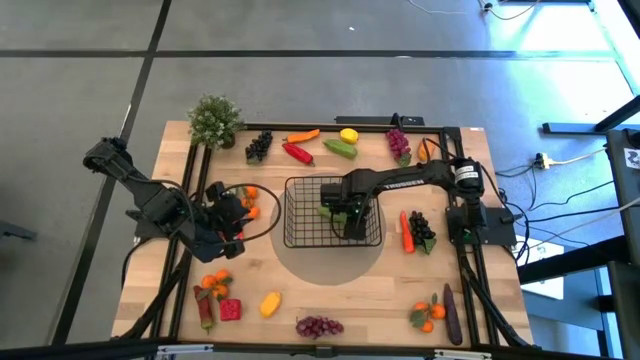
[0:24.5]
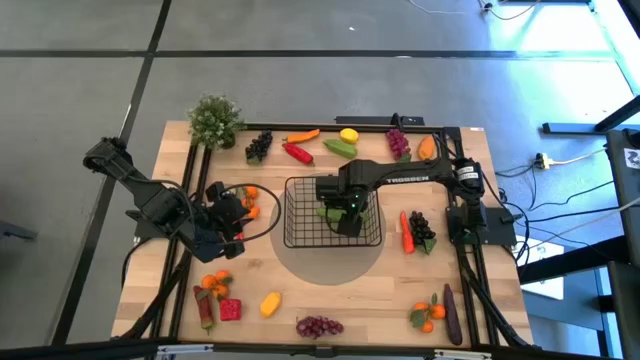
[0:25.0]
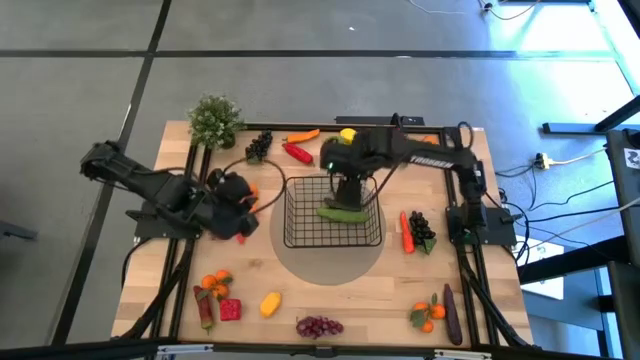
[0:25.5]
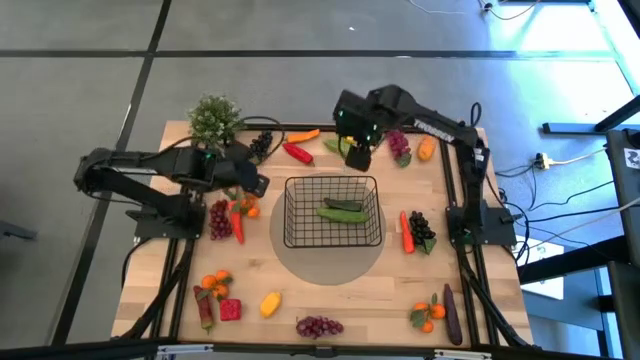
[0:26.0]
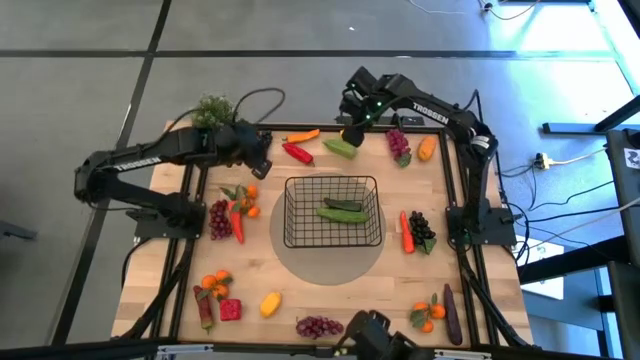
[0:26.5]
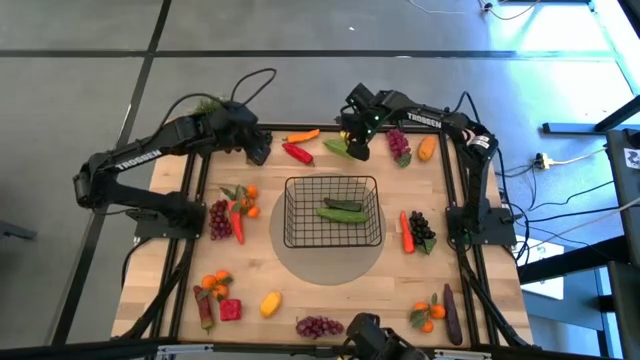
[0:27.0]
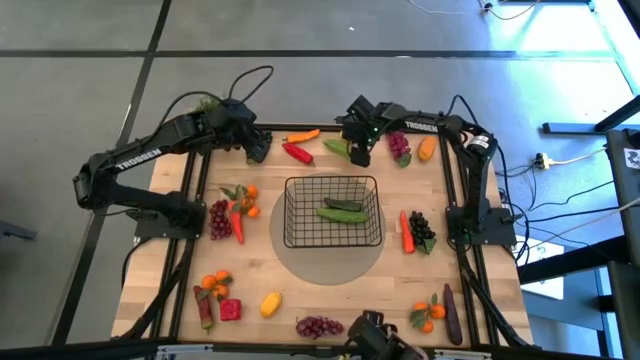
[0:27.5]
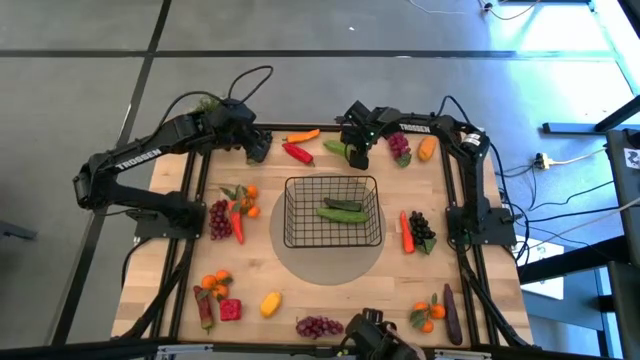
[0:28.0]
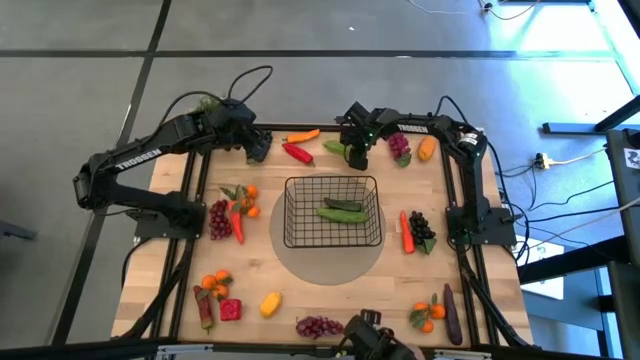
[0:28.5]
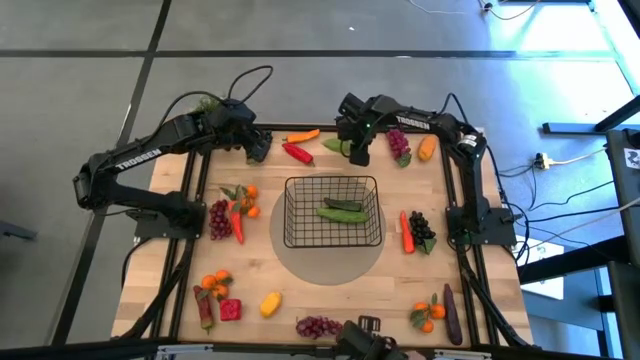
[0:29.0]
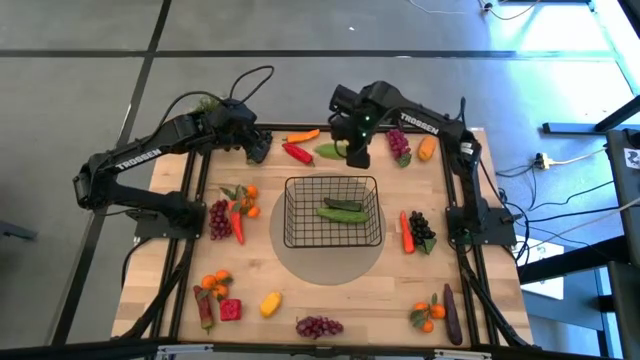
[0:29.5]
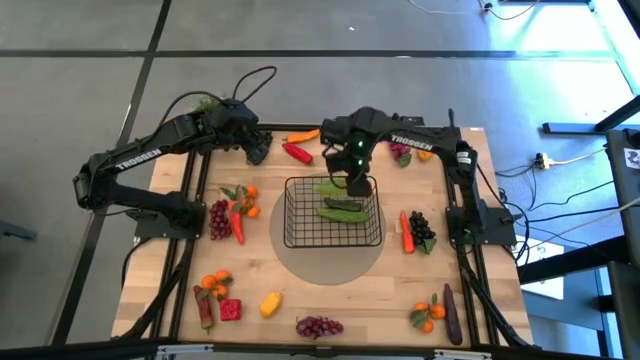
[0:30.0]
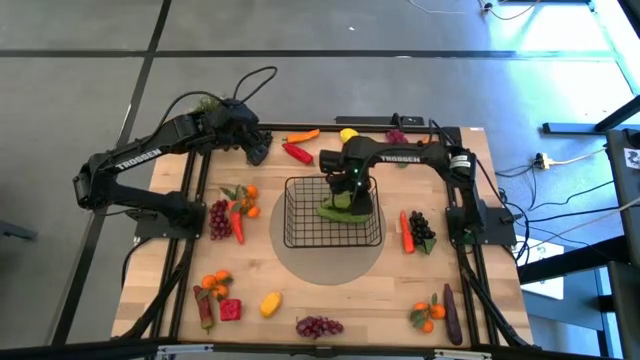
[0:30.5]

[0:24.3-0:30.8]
Task: Build produce basket
Put the cucumber into the basket

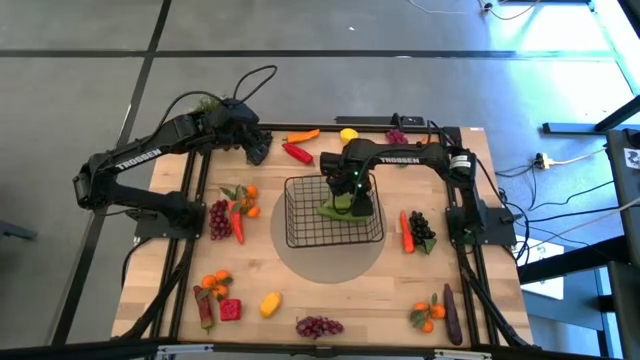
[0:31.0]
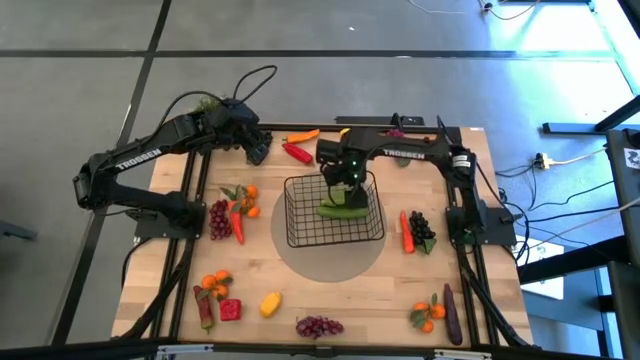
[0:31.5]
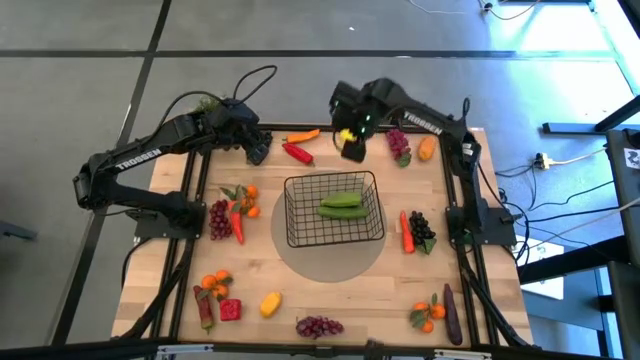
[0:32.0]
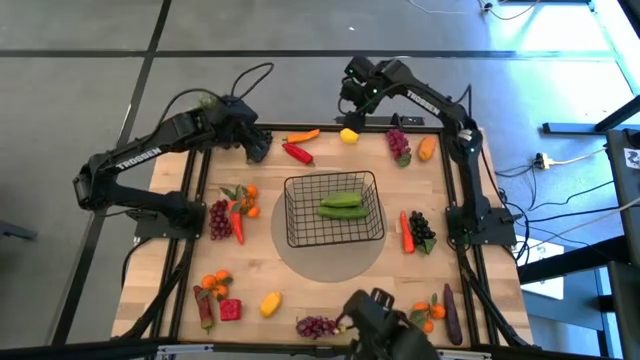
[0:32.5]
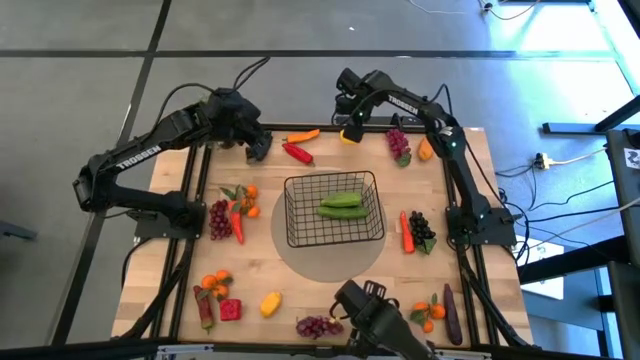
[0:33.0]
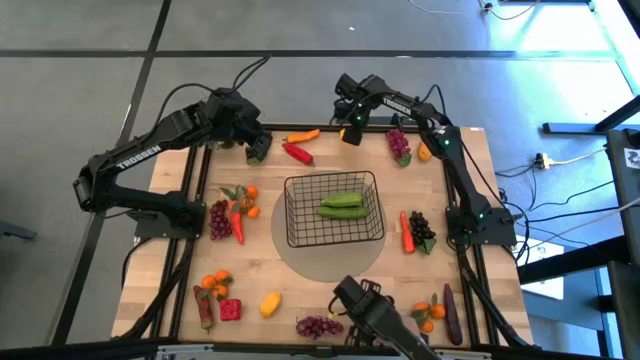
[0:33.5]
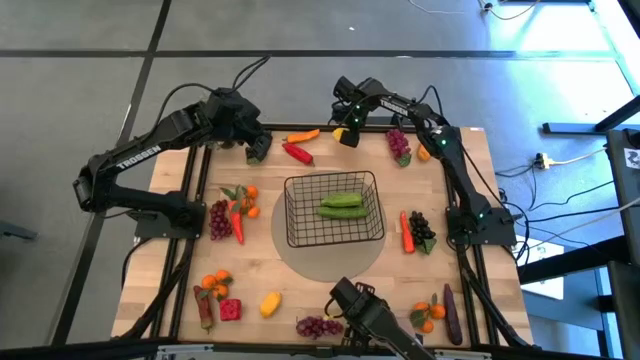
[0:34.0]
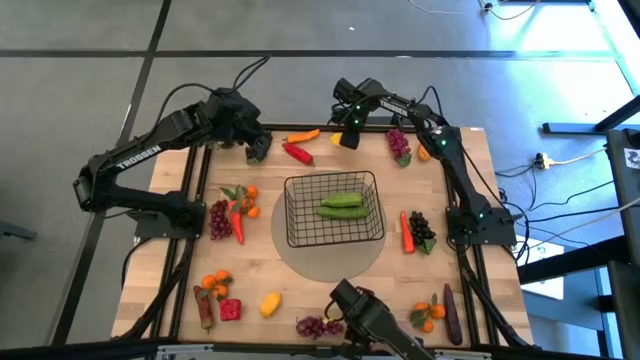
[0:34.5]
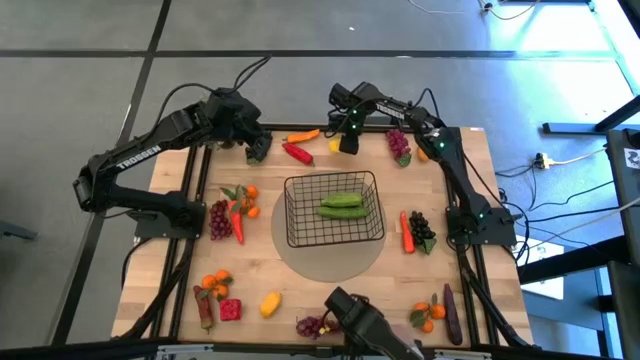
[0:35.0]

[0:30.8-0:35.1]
Put the top lemon into the basket

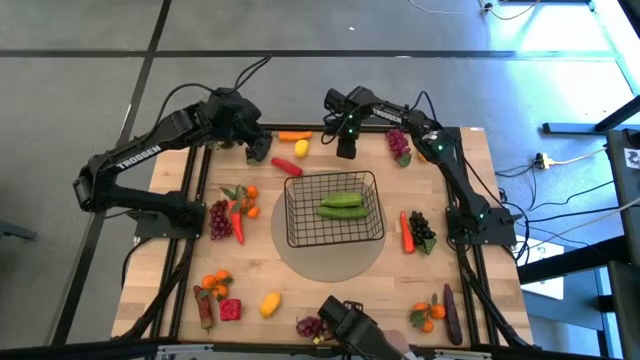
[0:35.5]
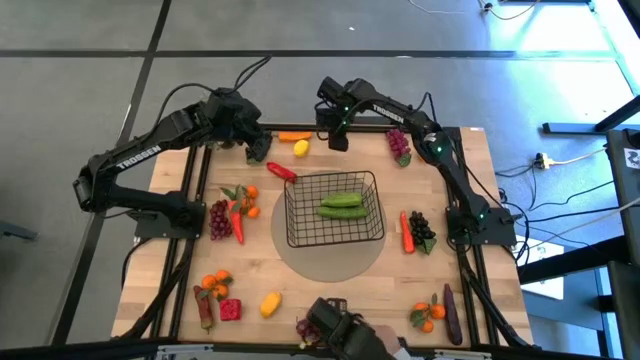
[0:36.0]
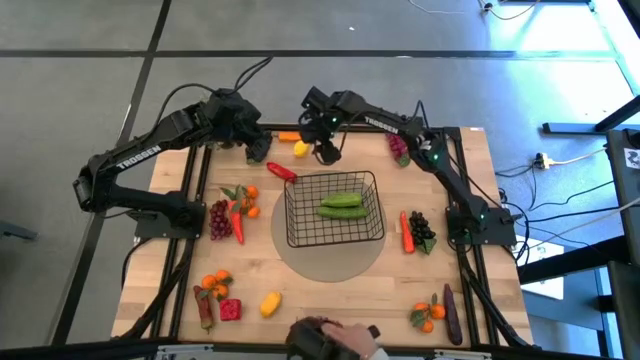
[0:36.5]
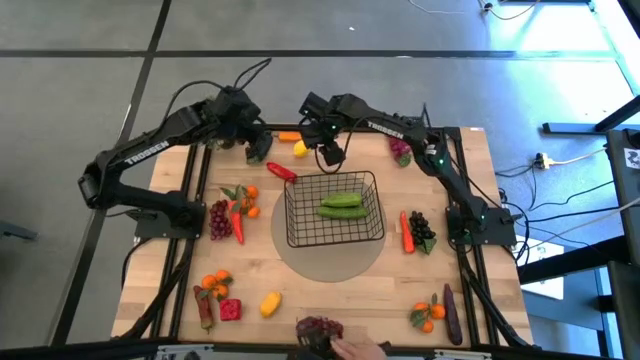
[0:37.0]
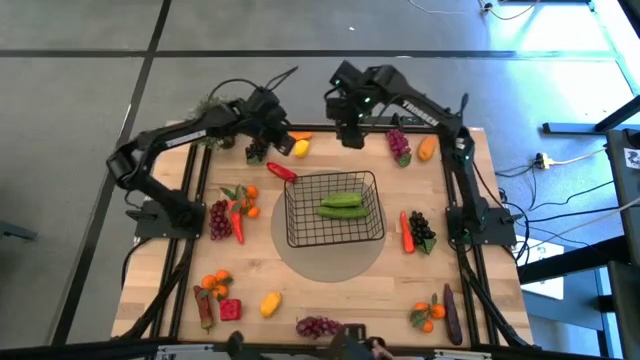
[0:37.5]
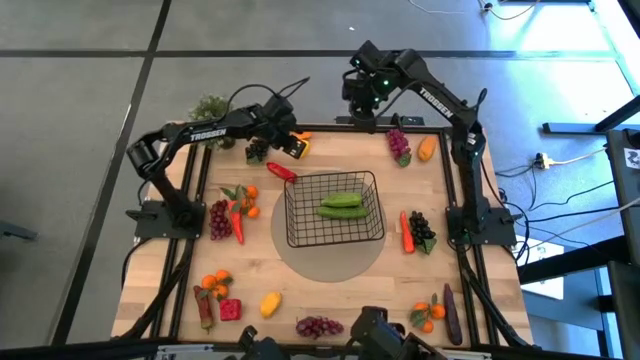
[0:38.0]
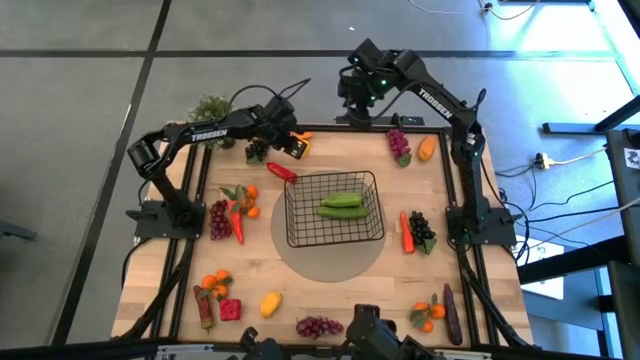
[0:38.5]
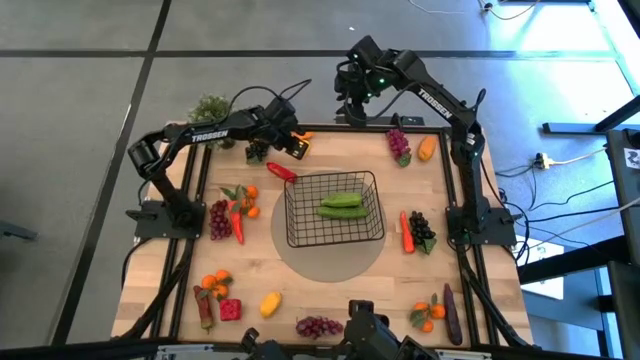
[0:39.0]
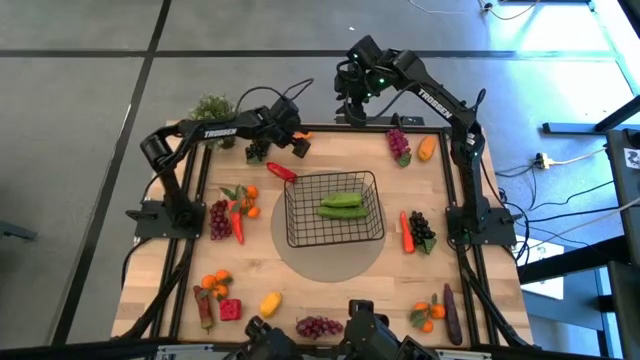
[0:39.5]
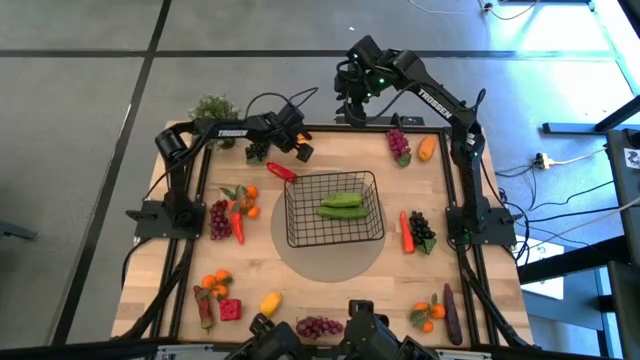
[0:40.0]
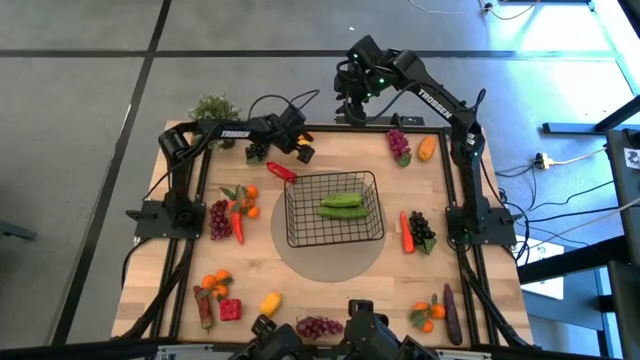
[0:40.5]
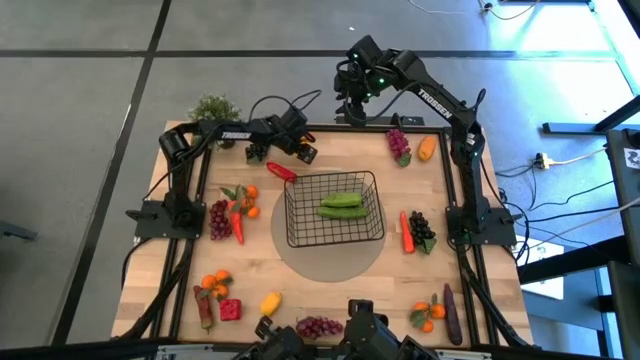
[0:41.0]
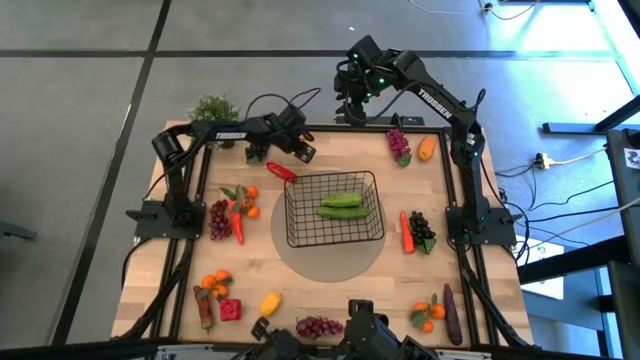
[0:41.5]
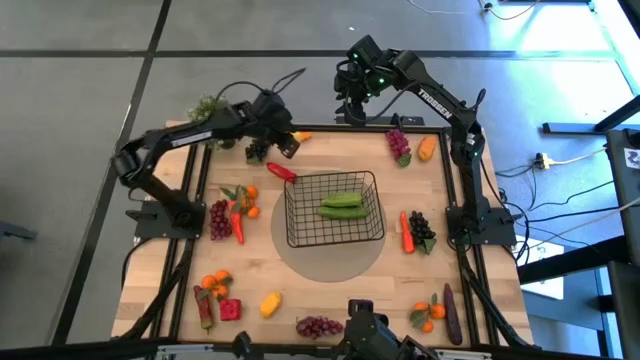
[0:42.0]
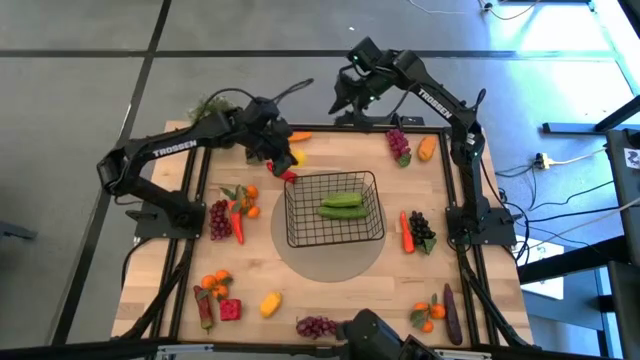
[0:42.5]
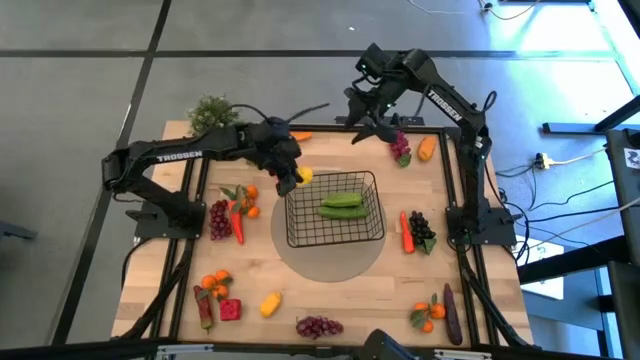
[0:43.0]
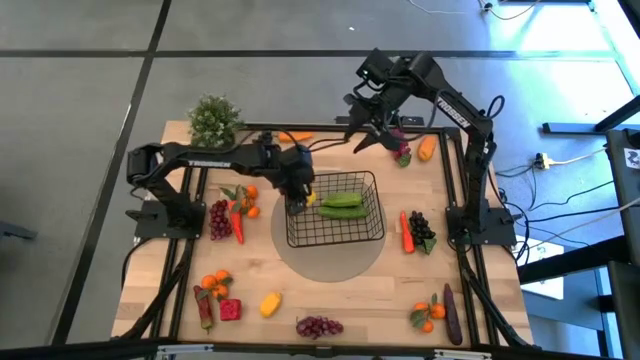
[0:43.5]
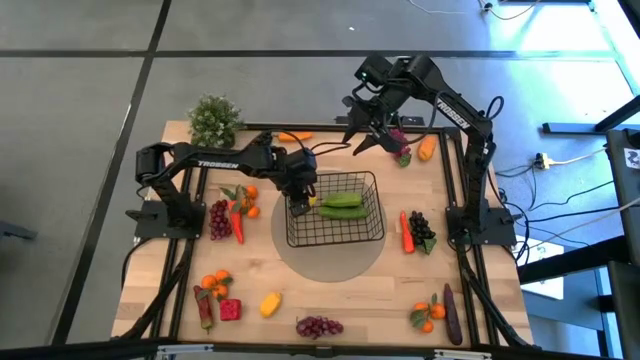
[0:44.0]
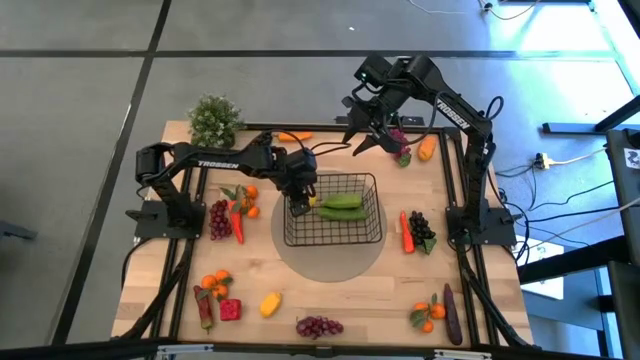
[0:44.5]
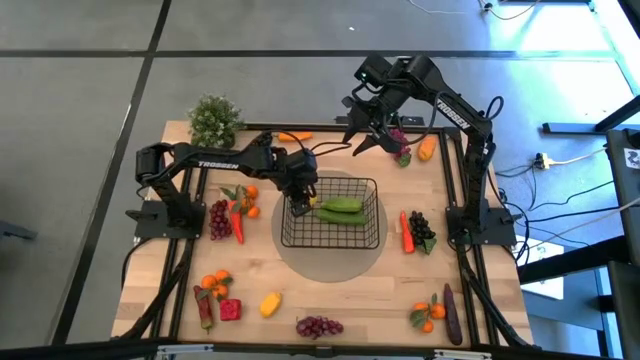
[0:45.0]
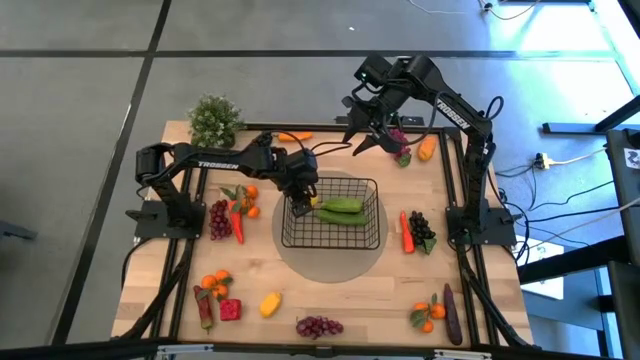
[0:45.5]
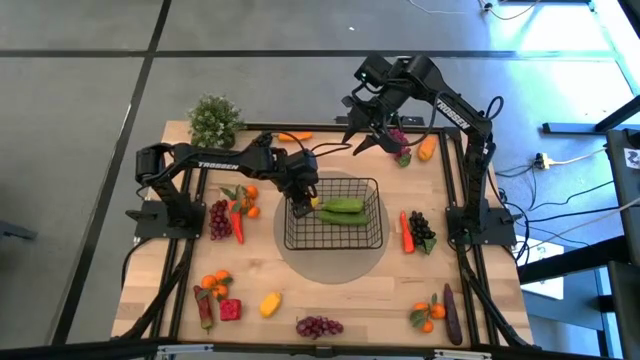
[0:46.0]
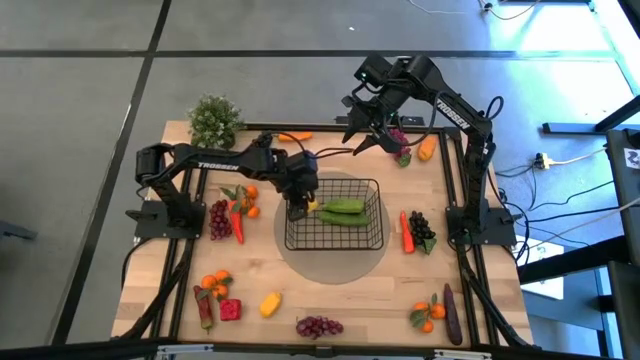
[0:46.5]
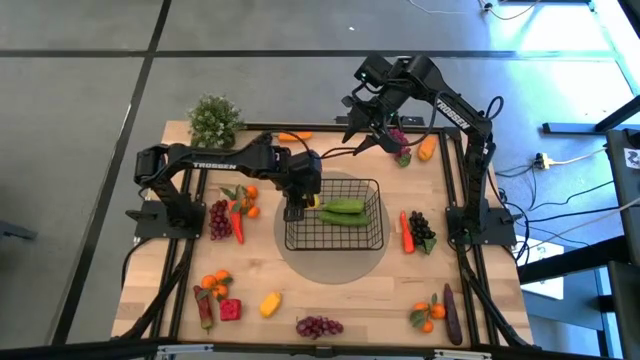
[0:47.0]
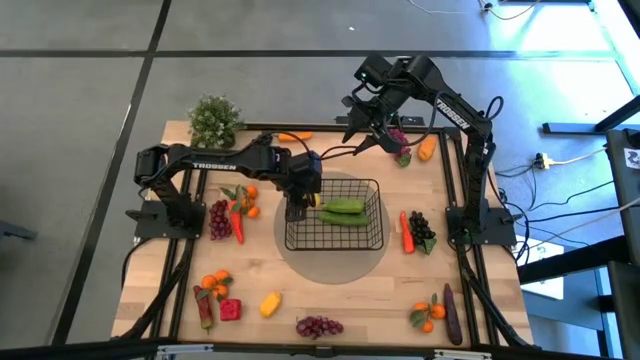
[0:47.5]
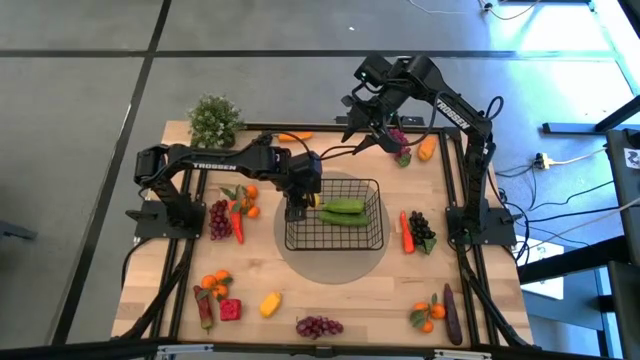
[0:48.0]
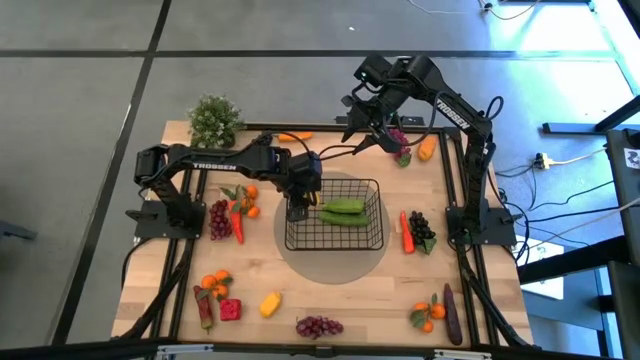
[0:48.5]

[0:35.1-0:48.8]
Put the top lemon into the basket
